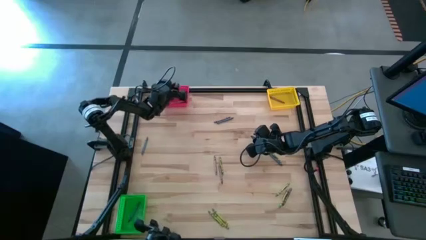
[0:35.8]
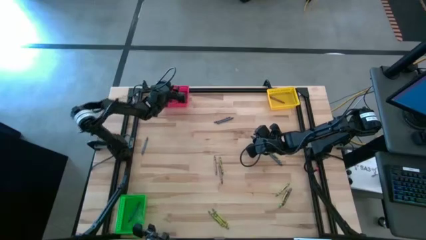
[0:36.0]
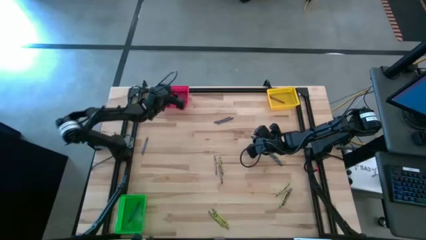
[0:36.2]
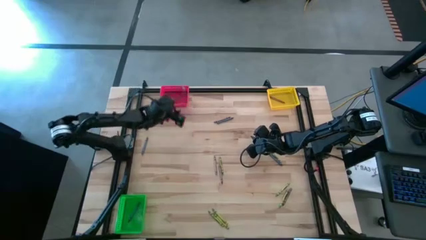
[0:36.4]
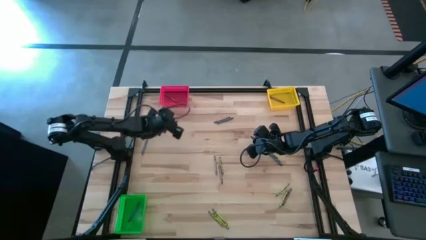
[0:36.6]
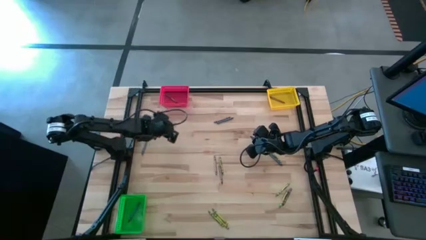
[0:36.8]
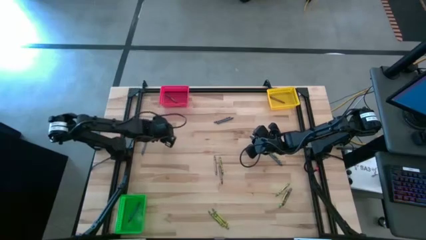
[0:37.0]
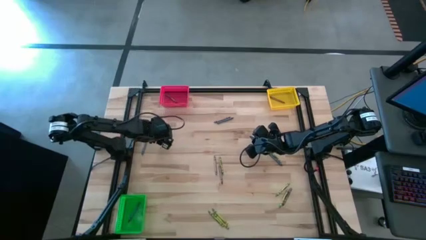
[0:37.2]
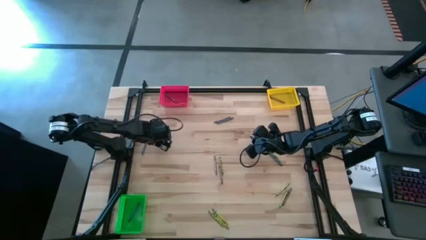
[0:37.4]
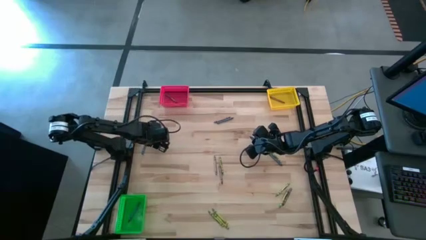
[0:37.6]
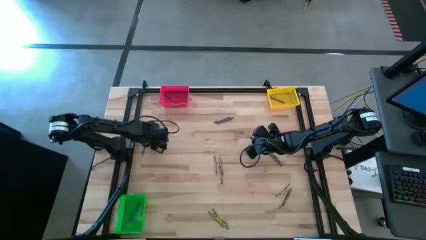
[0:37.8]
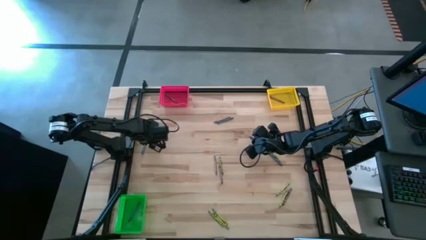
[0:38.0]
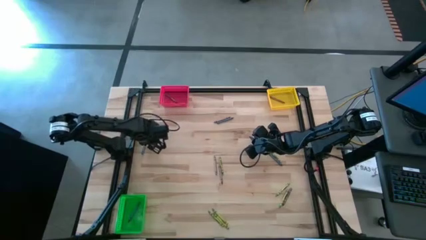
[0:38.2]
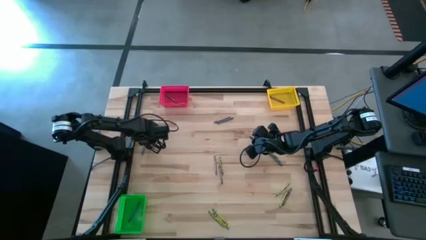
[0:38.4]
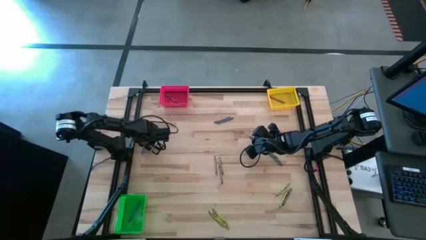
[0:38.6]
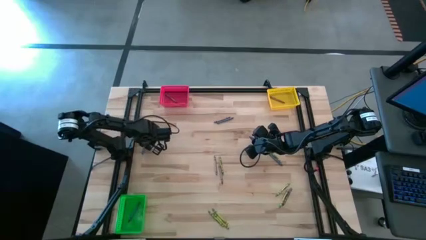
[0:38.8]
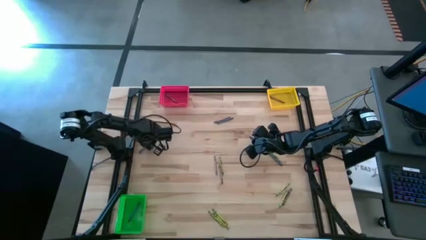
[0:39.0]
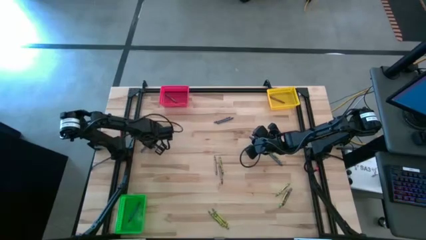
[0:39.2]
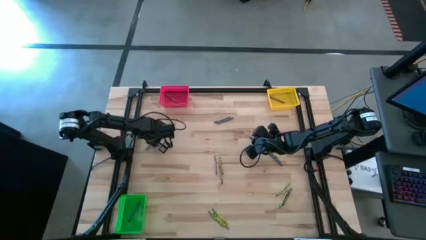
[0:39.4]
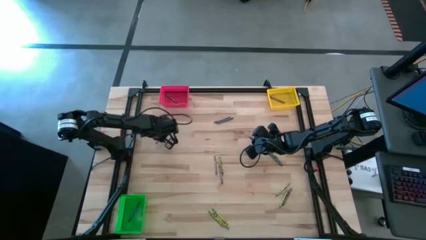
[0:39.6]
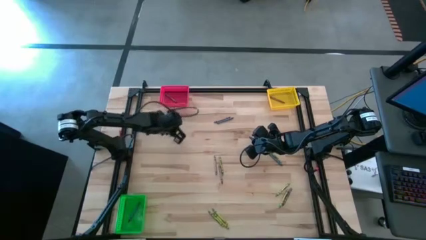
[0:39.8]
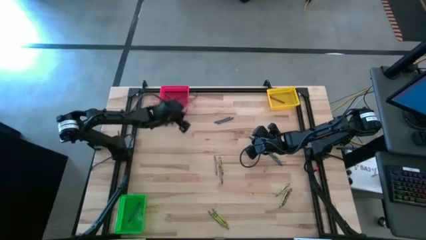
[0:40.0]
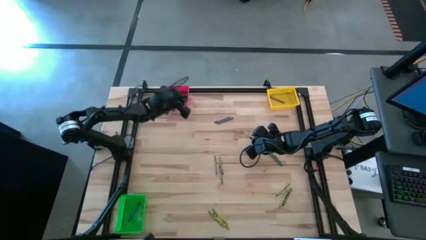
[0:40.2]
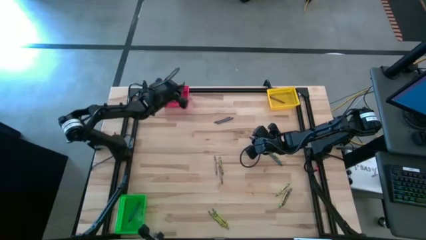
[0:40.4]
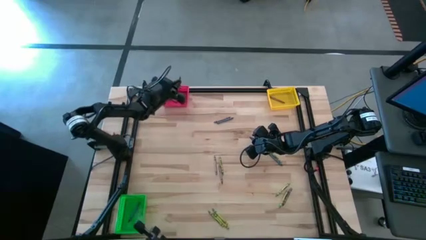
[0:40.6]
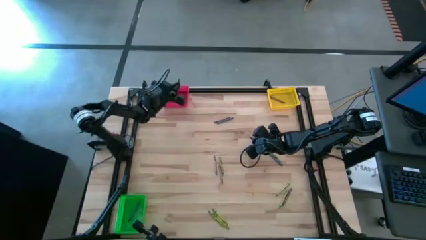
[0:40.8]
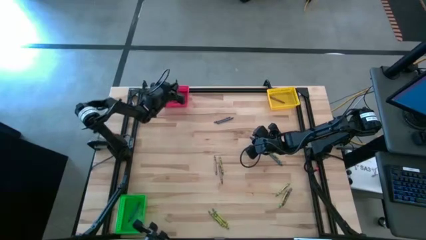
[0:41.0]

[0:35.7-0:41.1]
Task: Sort crayons
Put the blue crayon into the red bin

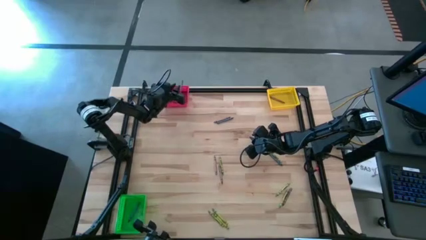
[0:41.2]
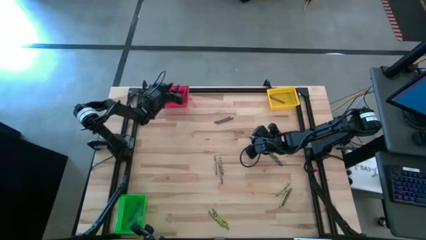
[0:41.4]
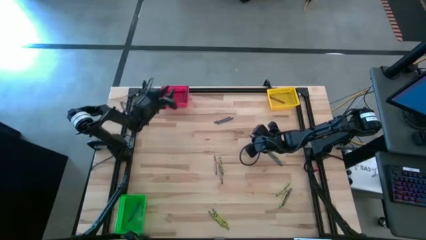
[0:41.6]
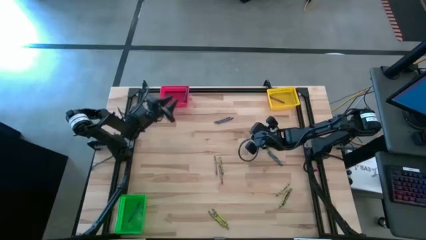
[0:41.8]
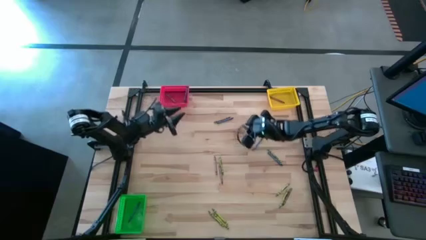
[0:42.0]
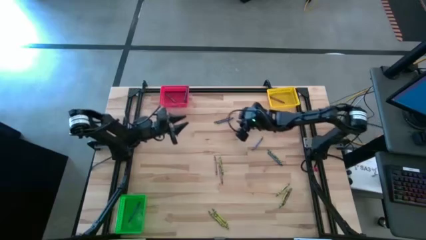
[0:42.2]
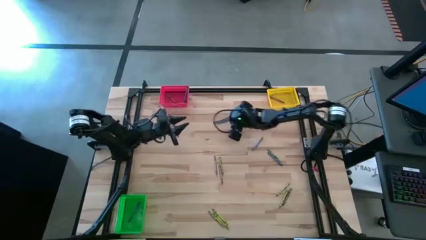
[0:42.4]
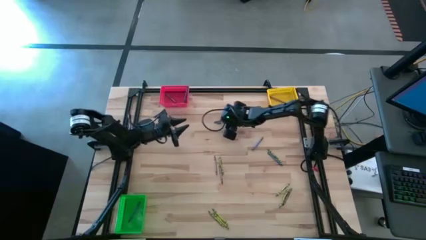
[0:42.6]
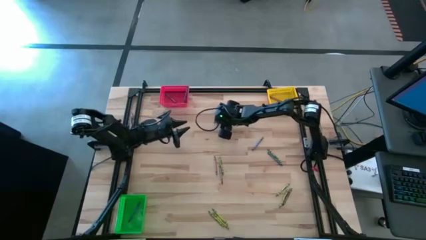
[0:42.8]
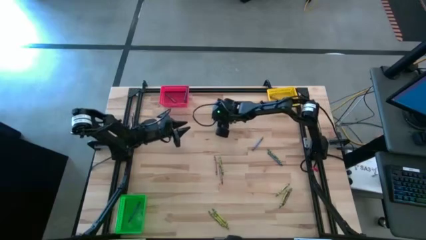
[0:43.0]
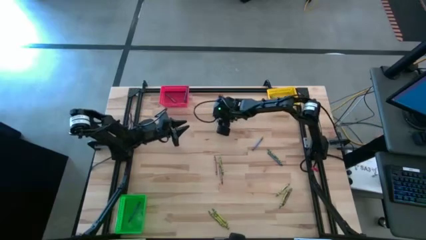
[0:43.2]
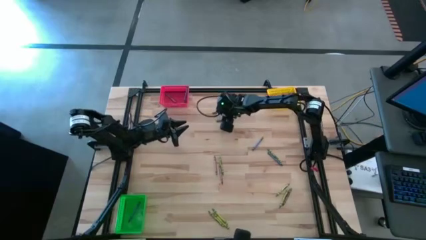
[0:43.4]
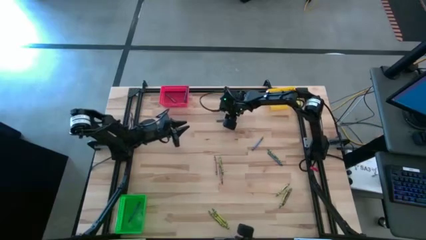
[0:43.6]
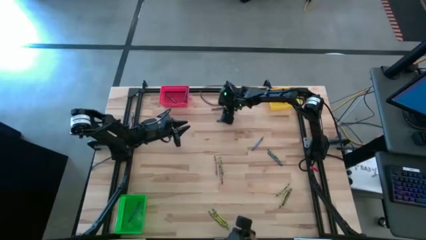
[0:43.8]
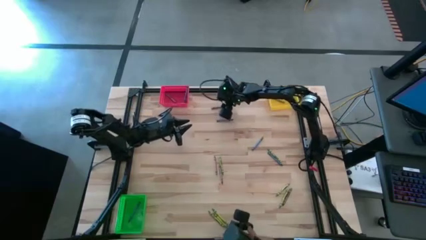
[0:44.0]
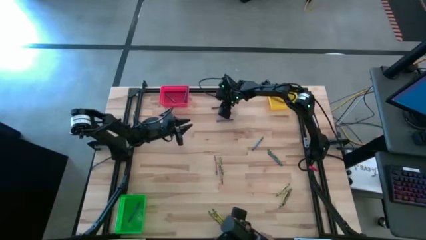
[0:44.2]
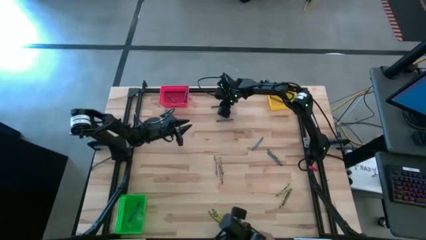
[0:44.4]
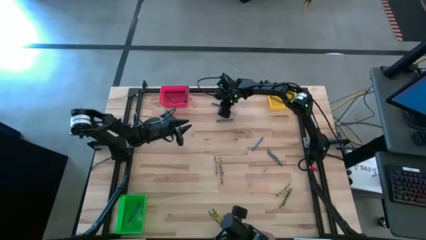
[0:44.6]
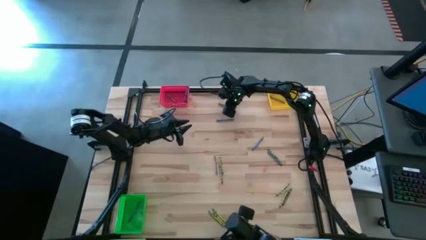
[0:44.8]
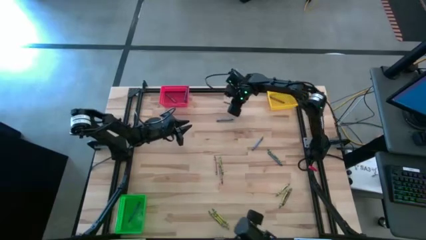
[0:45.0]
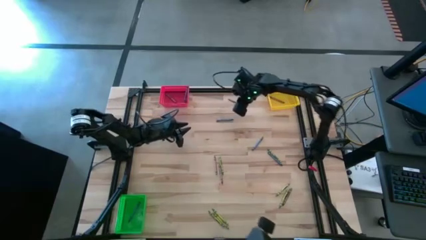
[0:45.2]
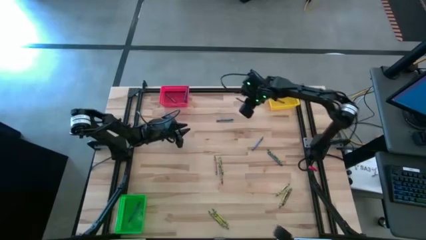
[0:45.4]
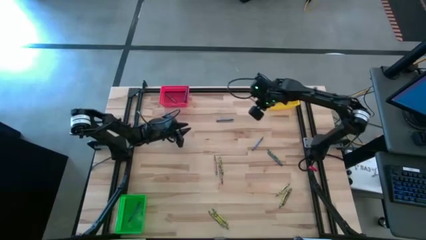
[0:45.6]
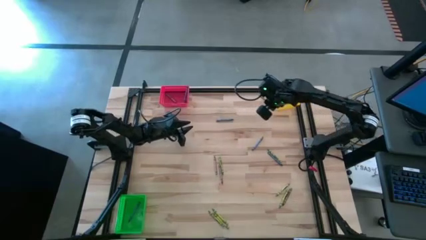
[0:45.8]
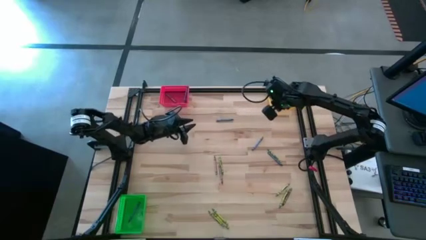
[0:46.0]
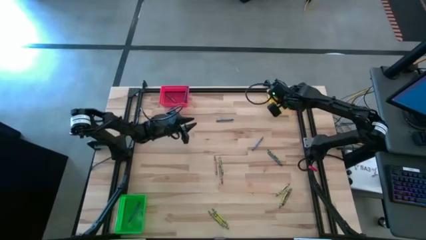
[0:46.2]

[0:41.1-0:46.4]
Put the brown crayon into the yellow bin

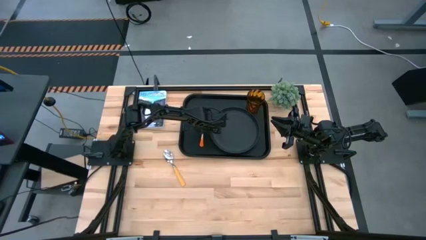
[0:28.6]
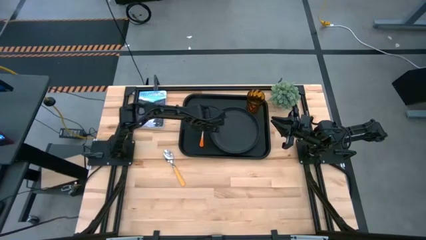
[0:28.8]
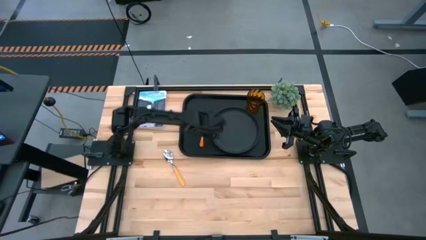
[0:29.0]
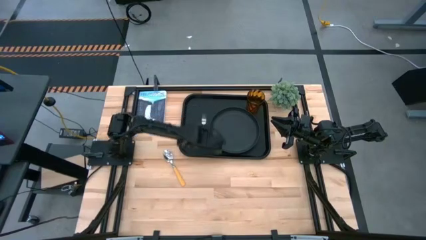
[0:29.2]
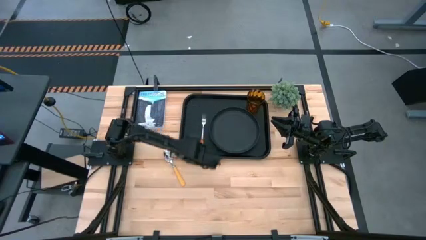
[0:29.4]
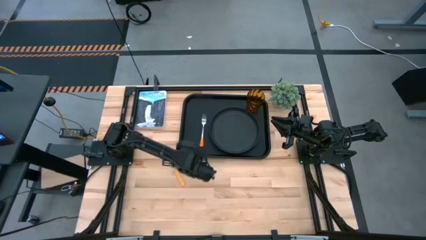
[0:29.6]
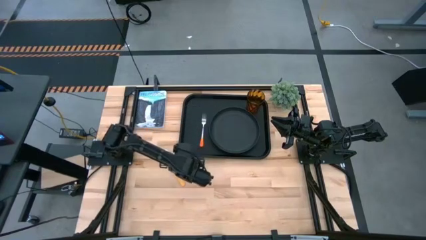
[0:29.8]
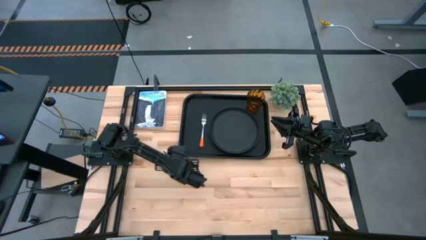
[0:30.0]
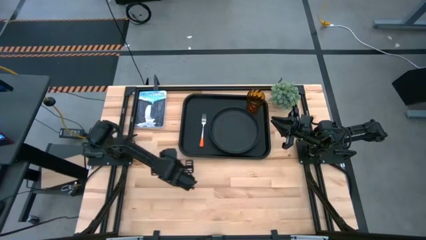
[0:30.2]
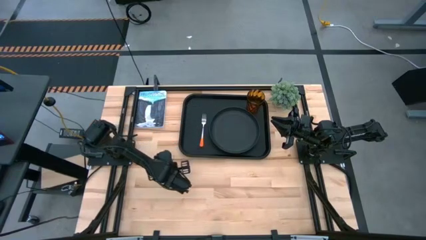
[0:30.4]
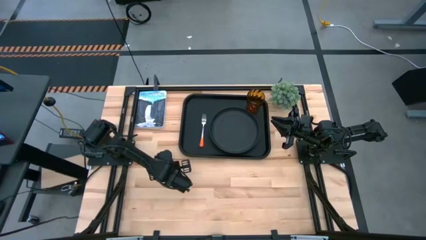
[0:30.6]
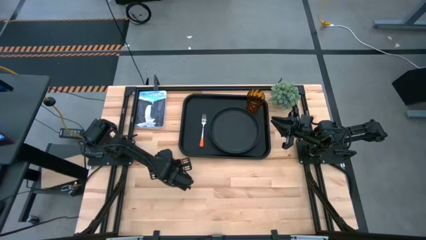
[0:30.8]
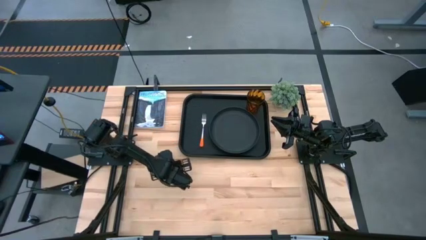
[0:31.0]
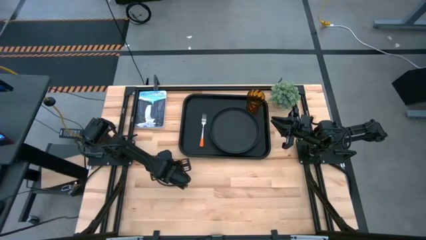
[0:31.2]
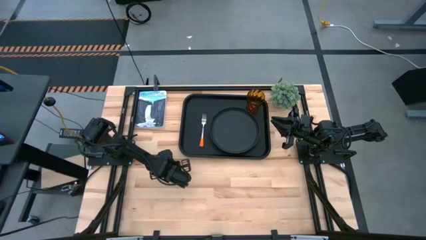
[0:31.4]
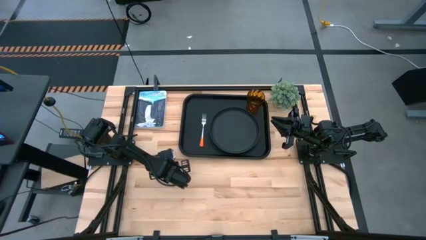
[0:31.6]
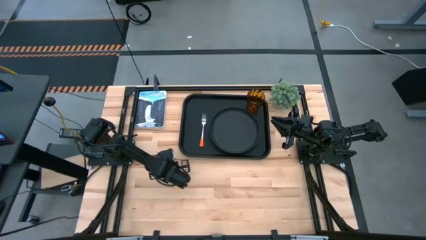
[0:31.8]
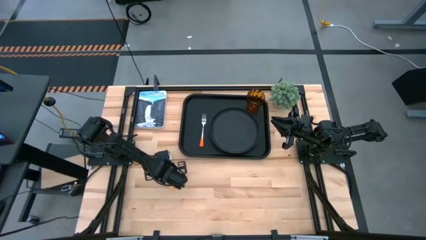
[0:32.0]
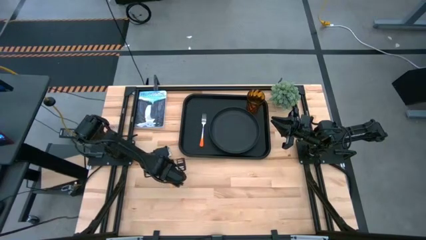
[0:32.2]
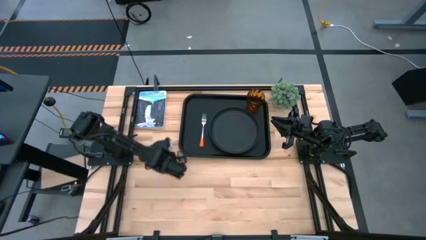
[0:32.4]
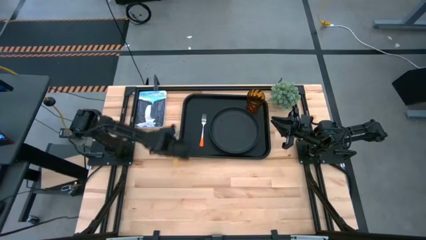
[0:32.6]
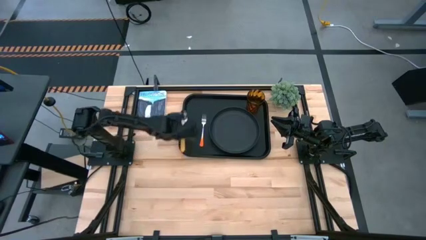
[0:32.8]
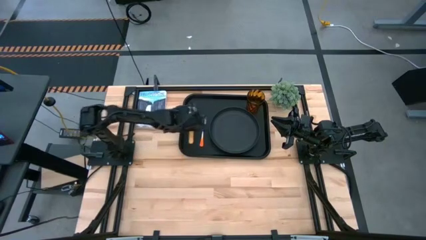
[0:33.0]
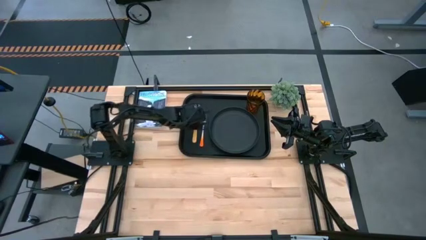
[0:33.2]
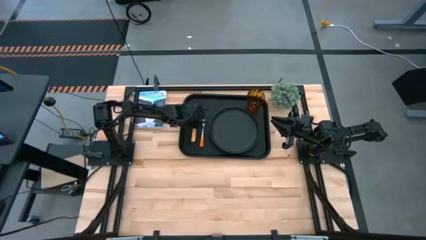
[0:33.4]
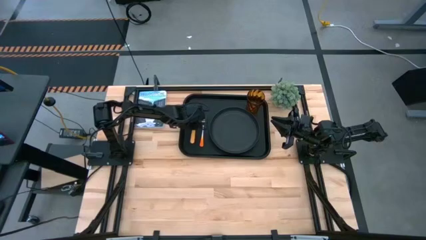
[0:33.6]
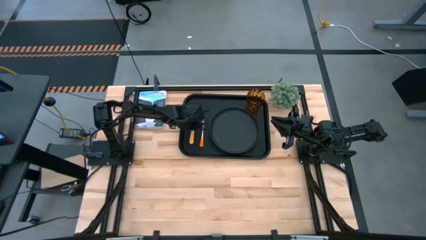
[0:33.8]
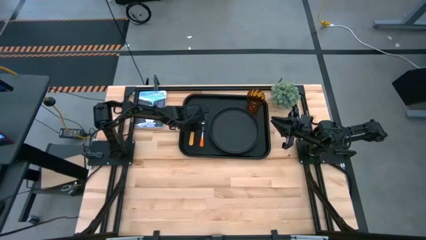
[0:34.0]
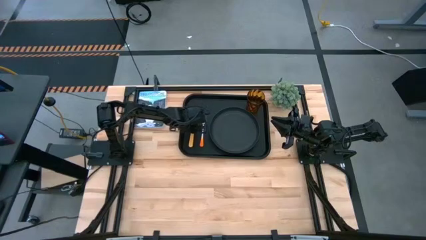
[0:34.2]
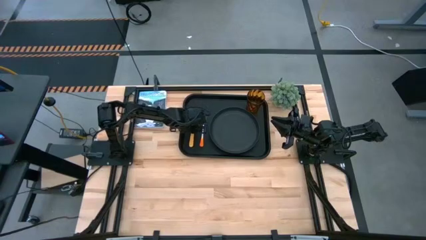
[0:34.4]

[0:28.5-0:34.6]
Task: Pick and place plate/cup/fork/spoon on tray
Put the yellow spoon on the black serving tray to the left of the orange fork
